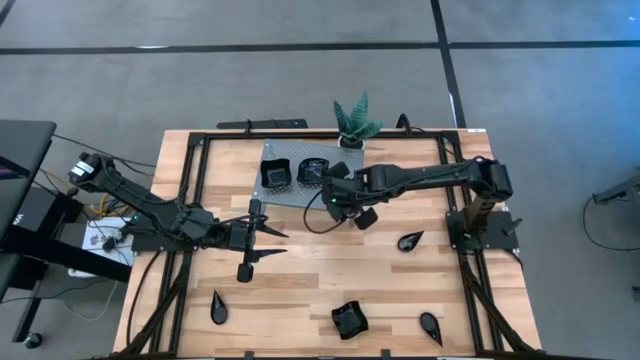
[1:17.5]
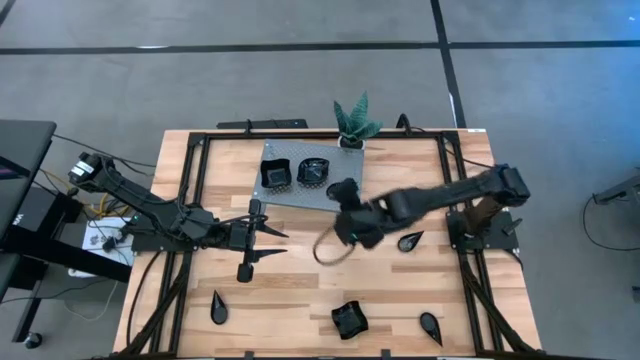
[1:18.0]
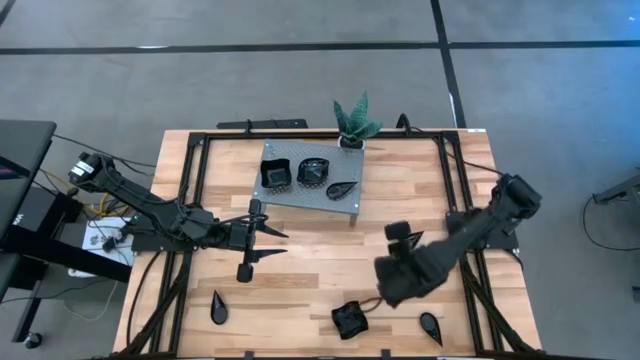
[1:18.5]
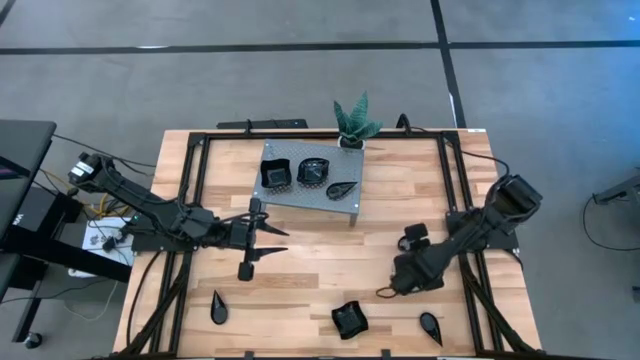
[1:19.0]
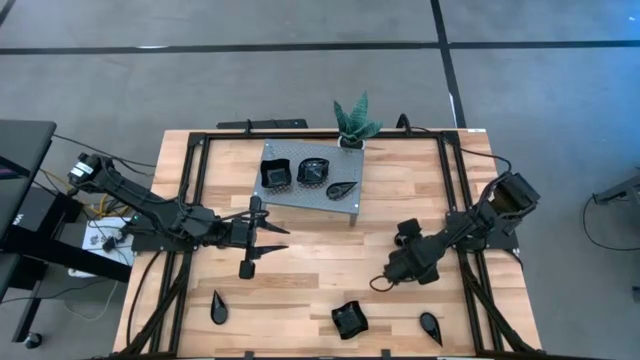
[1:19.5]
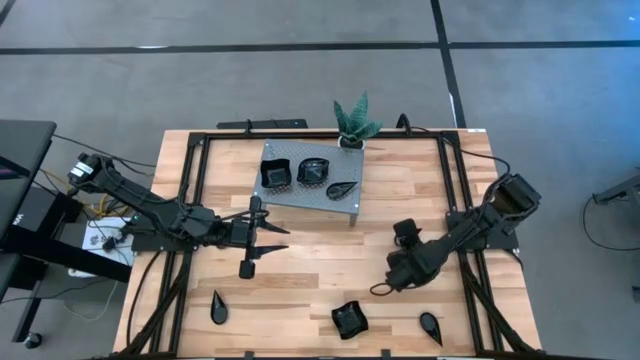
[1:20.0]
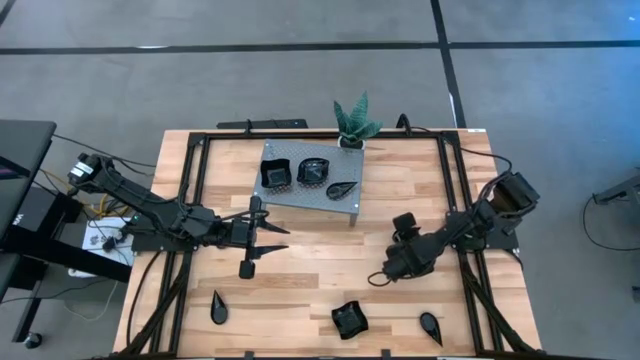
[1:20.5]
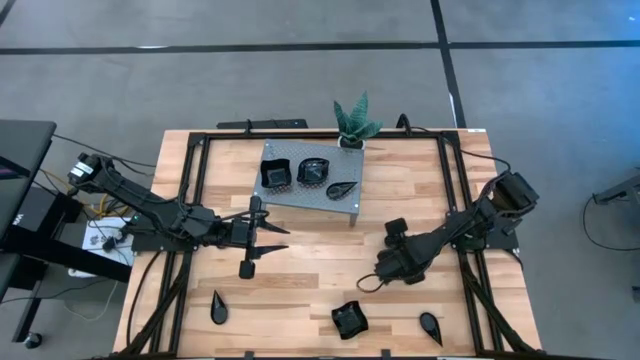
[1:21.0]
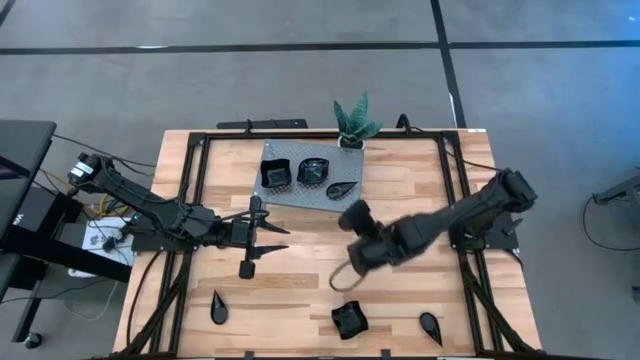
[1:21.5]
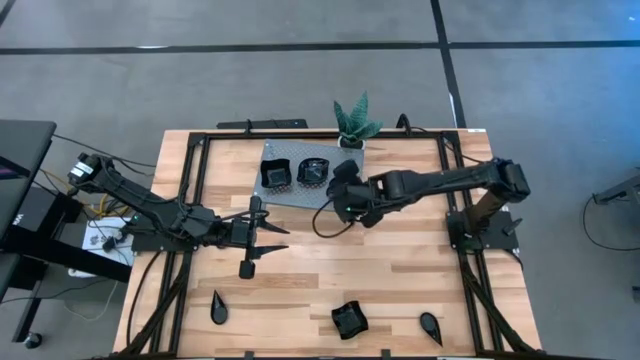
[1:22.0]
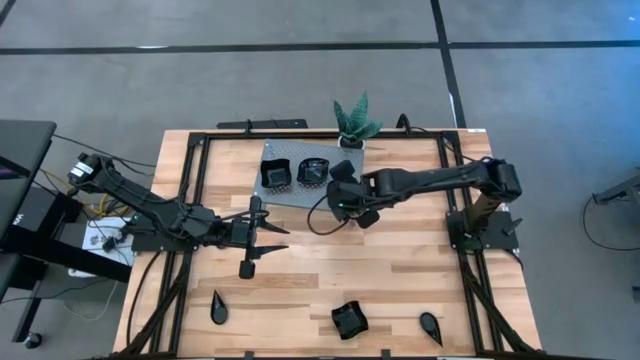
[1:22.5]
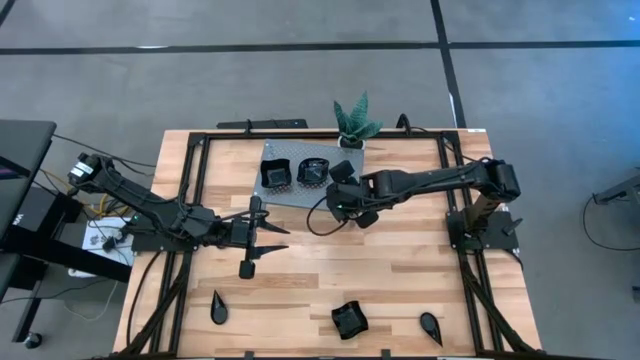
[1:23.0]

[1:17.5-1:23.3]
Task: Pick & Place Mini shaped plates
Stack the black drop shaped plate on top of the black drop shaped plate on the shelf

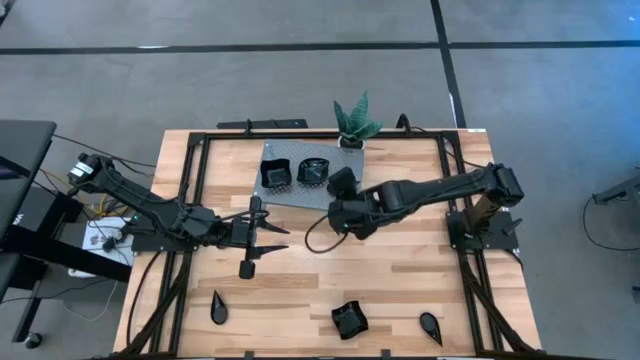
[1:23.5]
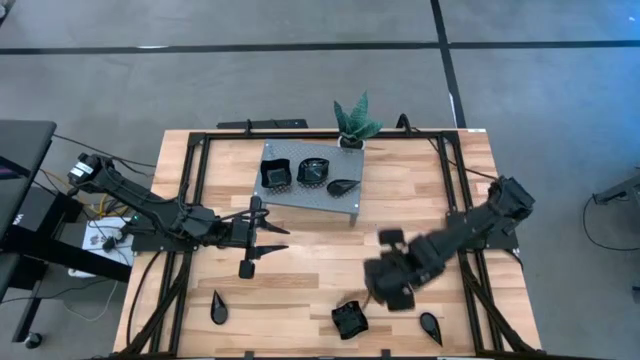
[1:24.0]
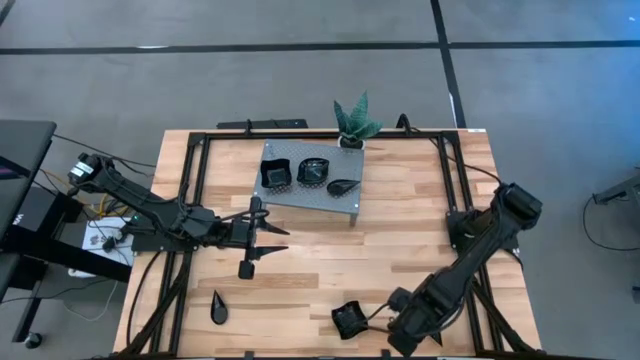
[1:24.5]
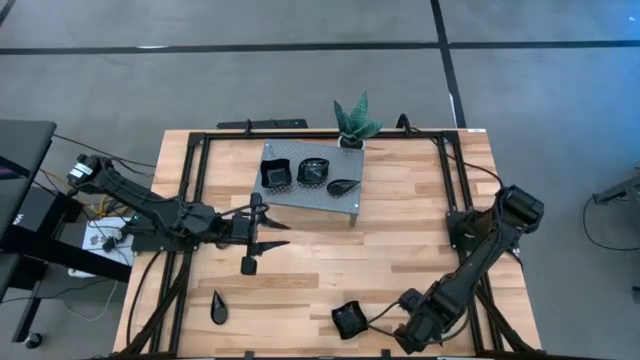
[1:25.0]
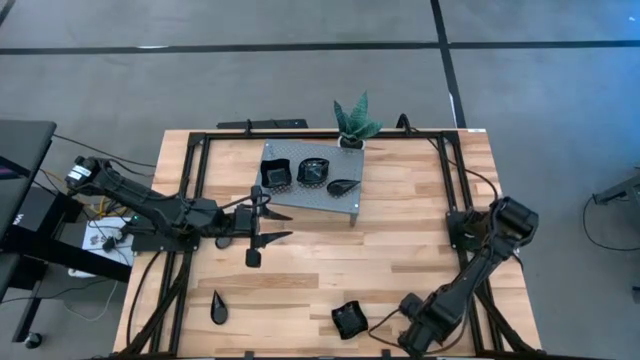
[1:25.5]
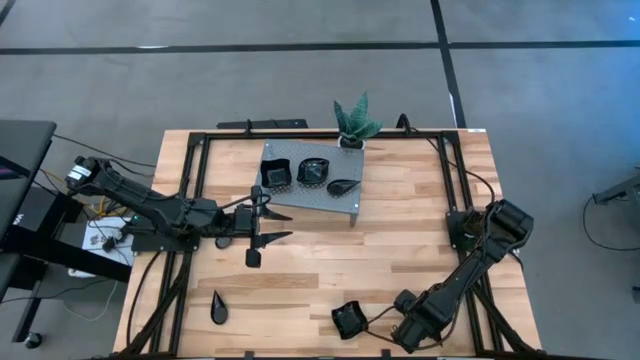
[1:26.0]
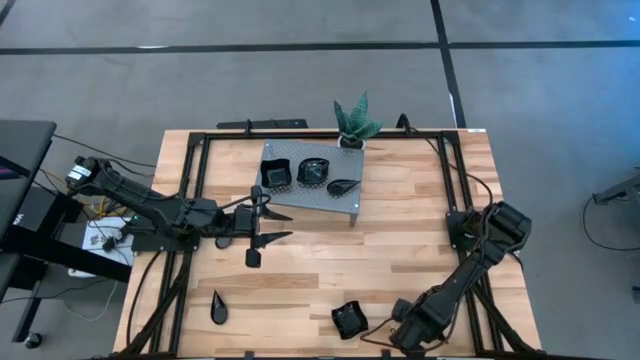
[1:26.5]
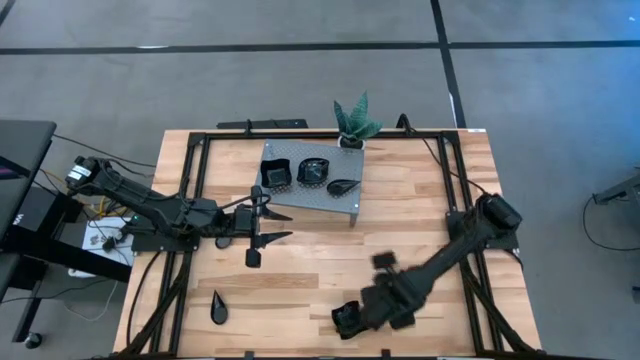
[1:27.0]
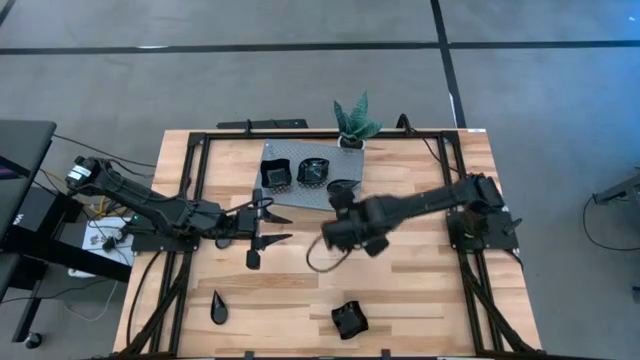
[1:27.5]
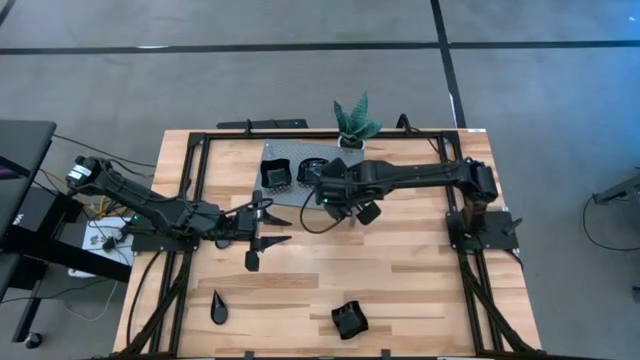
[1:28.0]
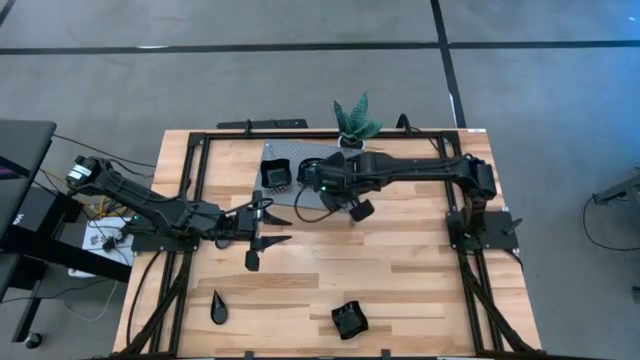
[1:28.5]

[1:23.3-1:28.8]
Stack the black drop shaped plate on top of the black drop shaped plates on the shelf

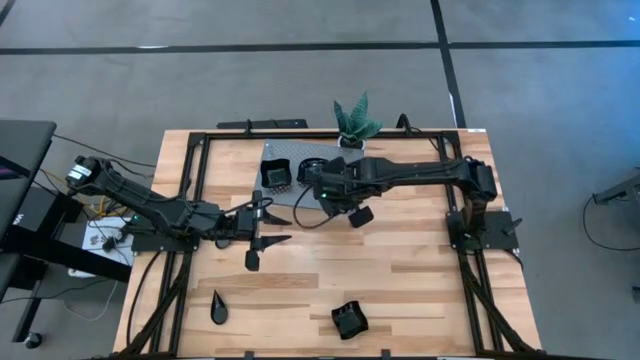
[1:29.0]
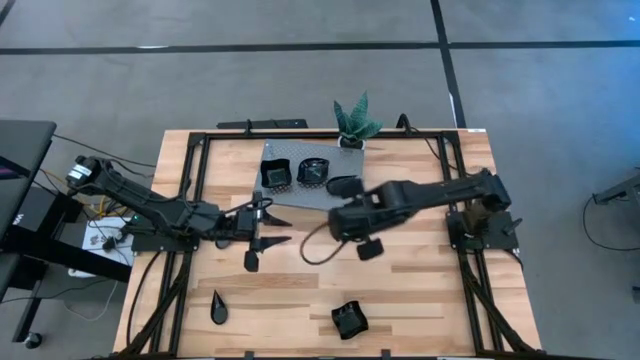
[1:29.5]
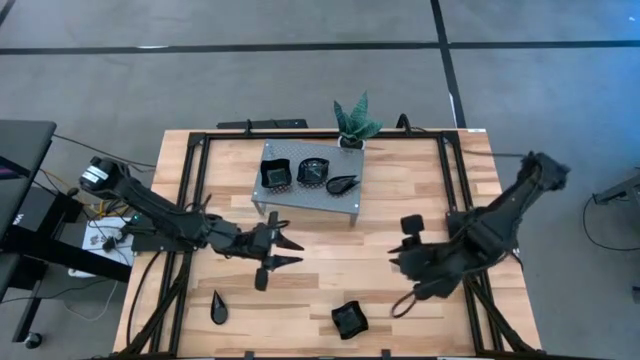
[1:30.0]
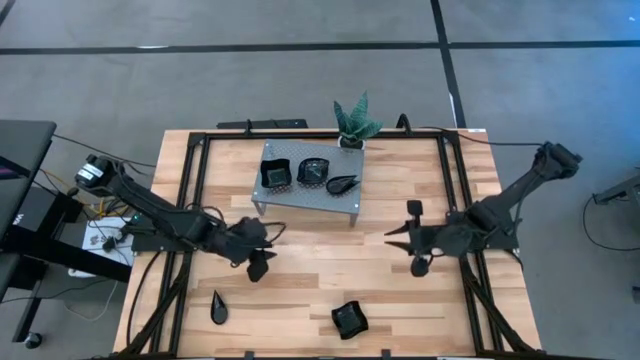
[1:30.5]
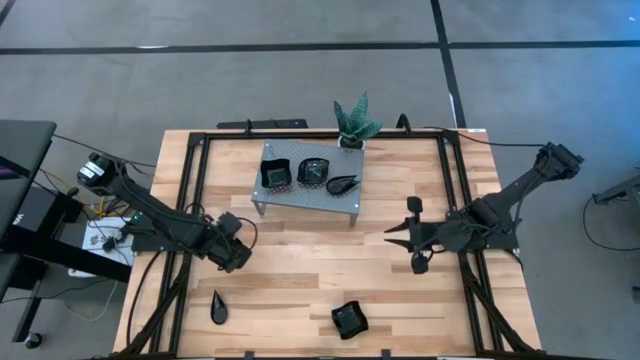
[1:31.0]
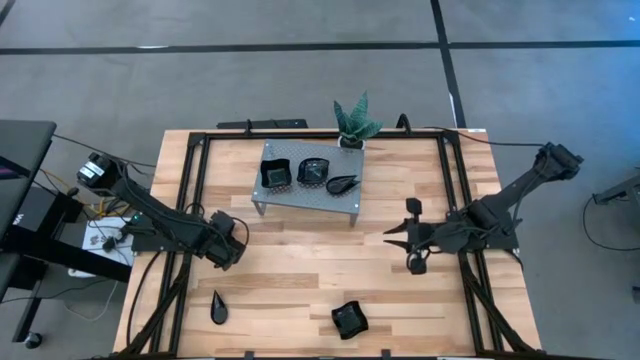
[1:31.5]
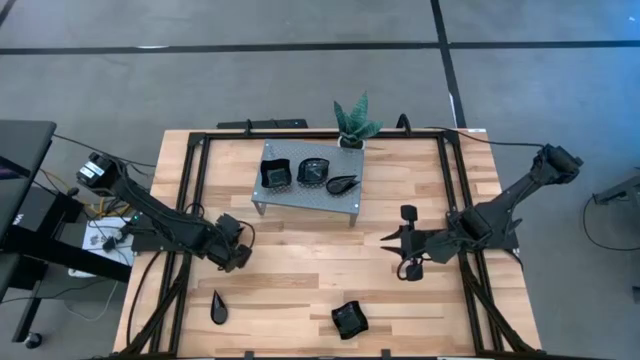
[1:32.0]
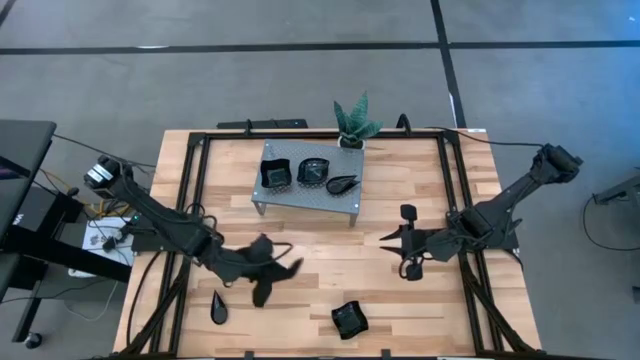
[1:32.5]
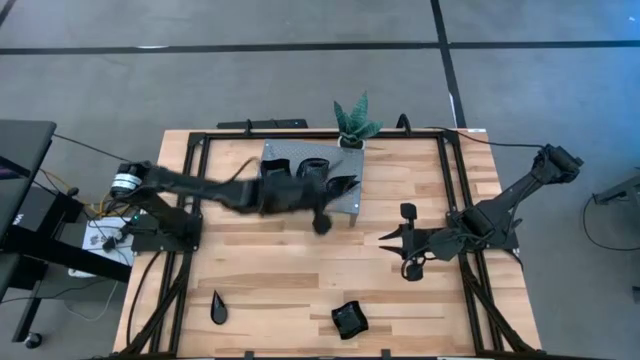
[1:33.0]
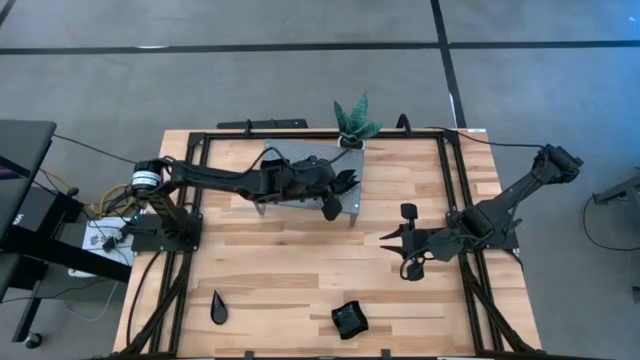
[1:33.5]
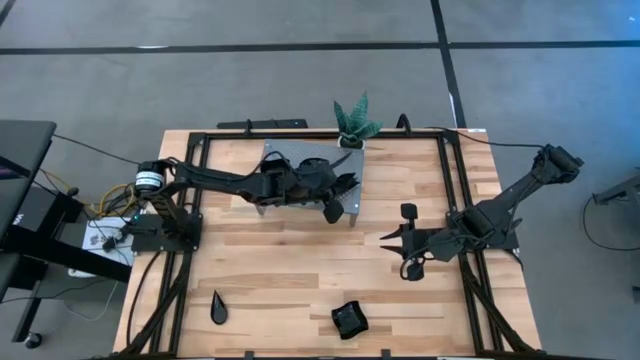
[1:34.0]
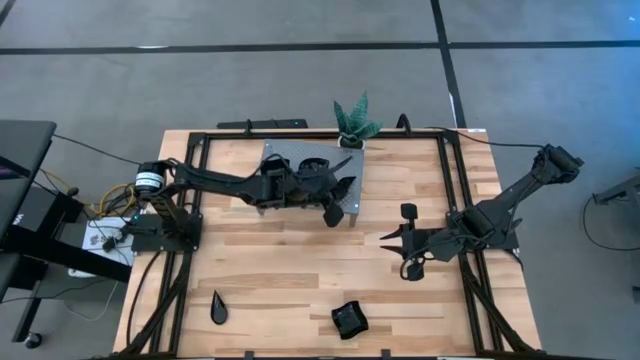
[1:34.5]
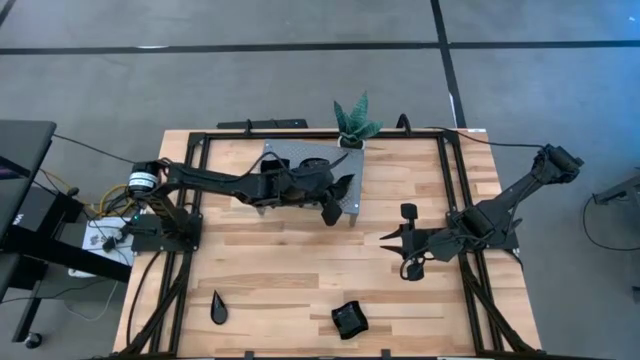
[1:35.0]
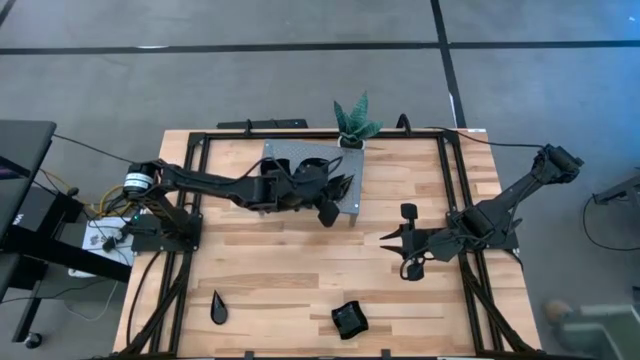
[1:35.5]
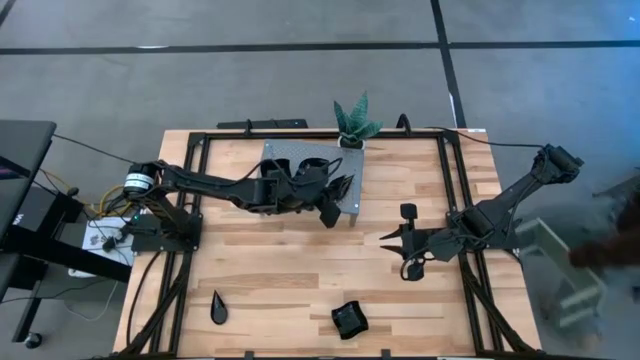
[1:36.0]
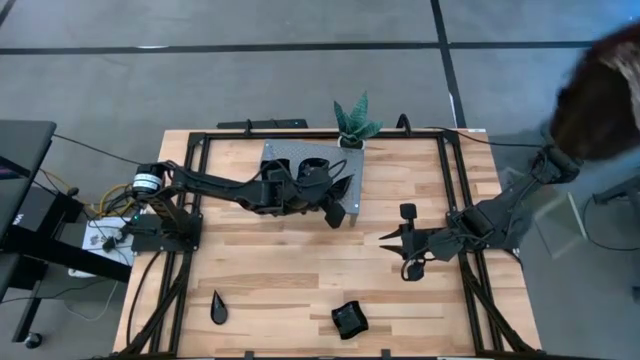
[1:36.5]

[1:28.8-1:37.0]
Stack the black drop shaped plate on top of the black drop shaped plates on the shelf
